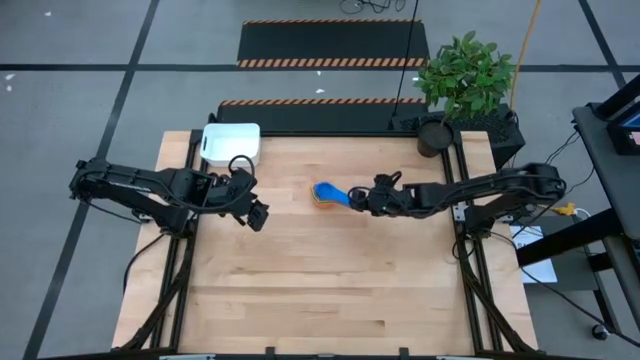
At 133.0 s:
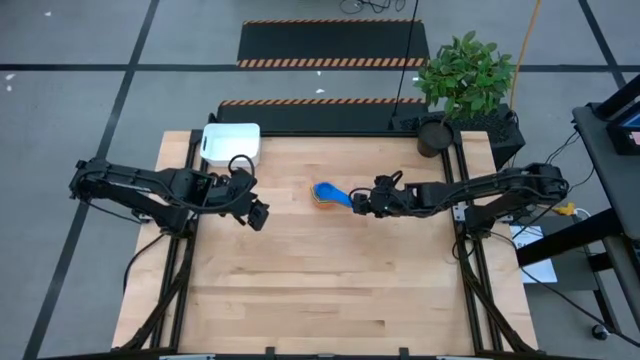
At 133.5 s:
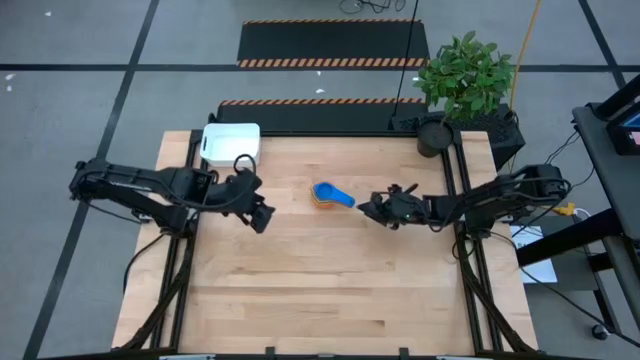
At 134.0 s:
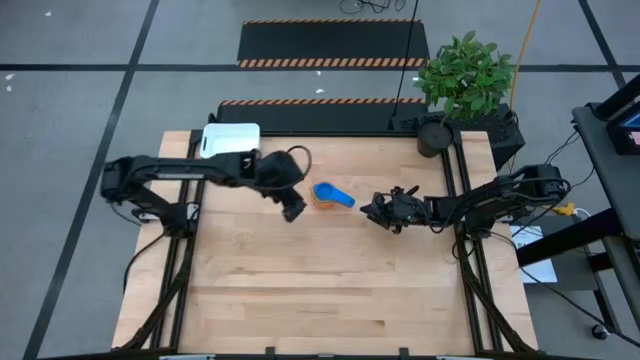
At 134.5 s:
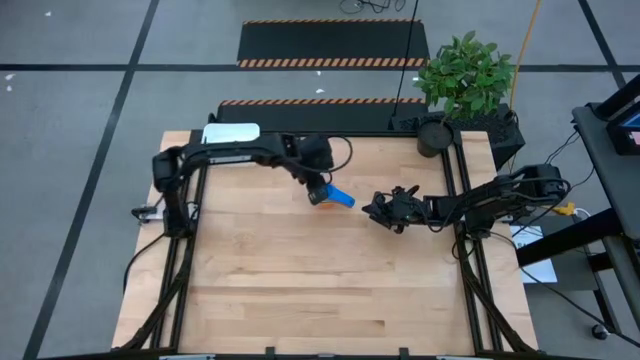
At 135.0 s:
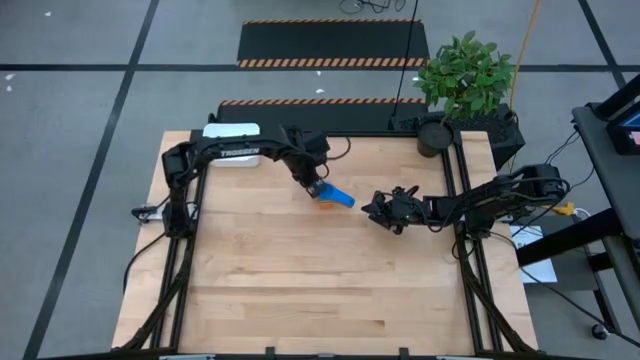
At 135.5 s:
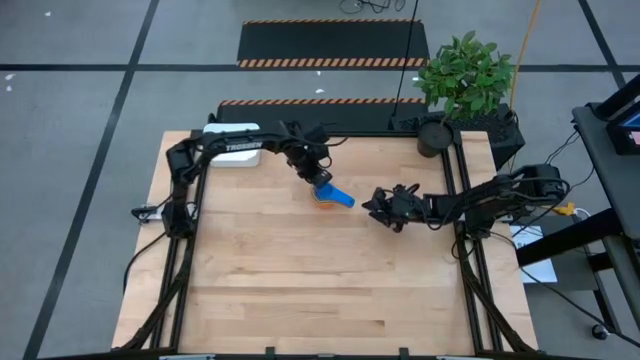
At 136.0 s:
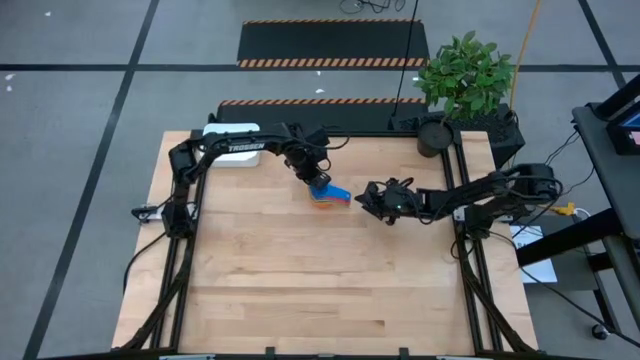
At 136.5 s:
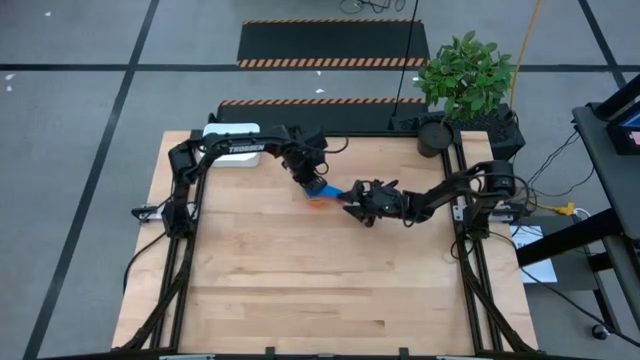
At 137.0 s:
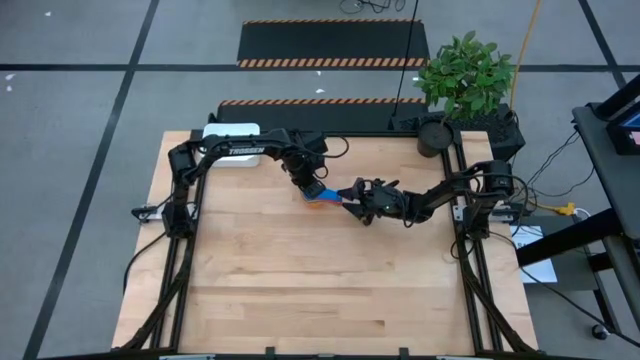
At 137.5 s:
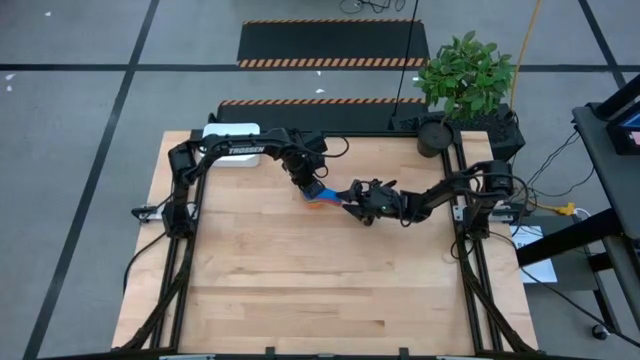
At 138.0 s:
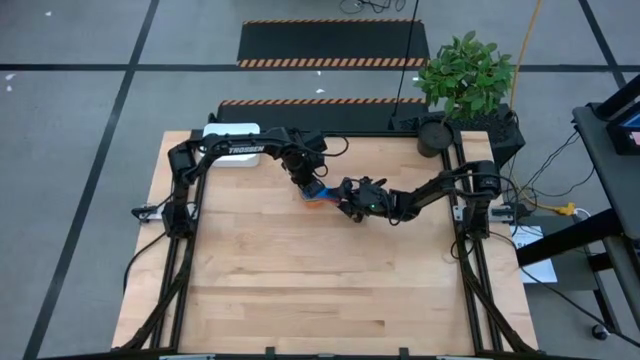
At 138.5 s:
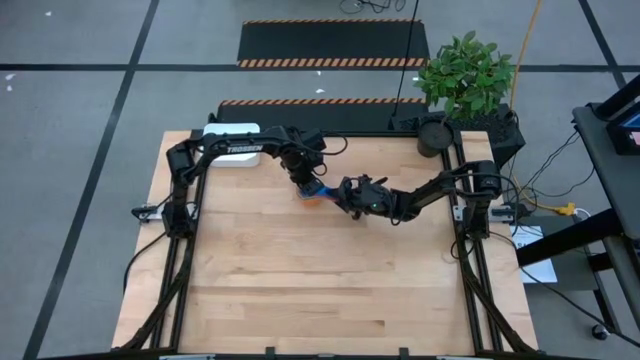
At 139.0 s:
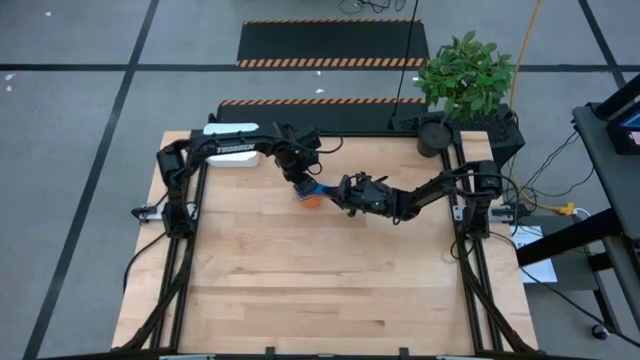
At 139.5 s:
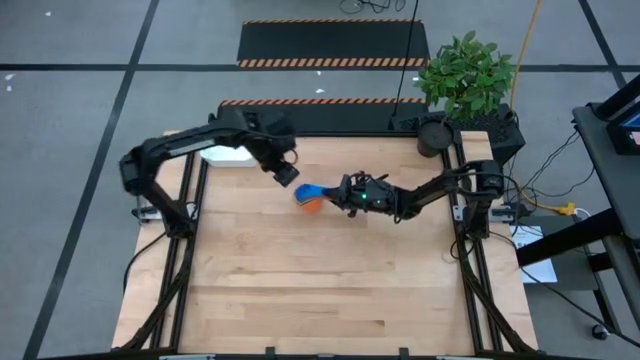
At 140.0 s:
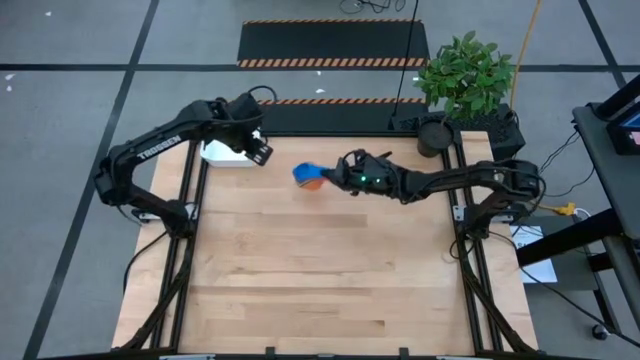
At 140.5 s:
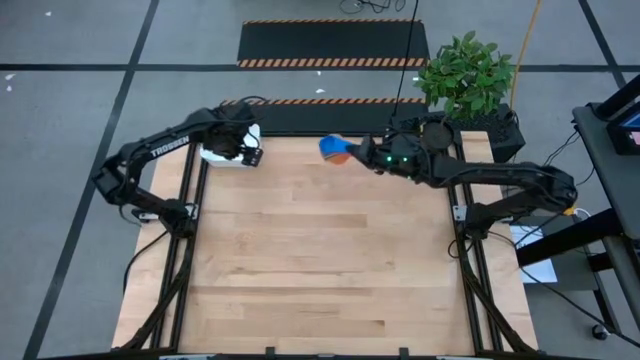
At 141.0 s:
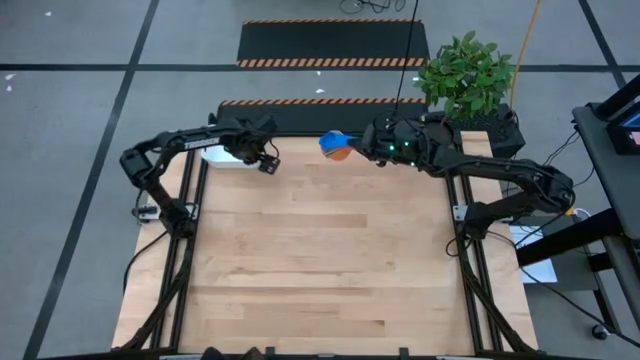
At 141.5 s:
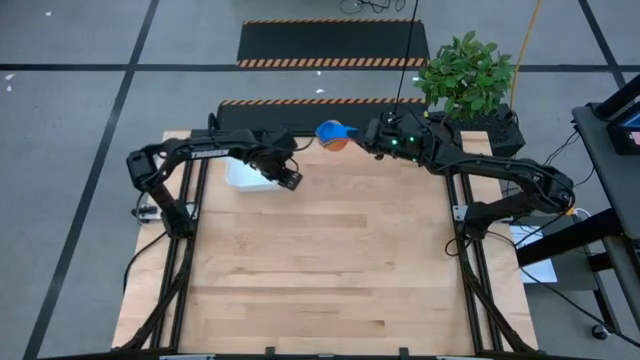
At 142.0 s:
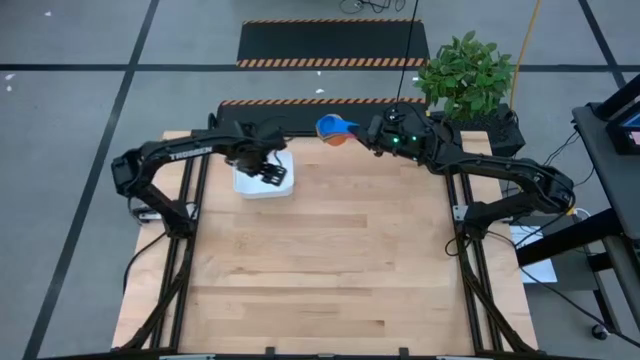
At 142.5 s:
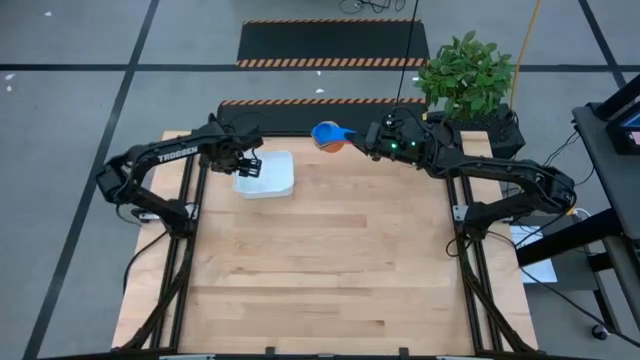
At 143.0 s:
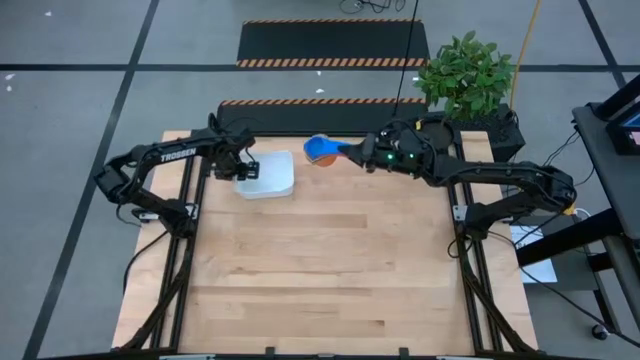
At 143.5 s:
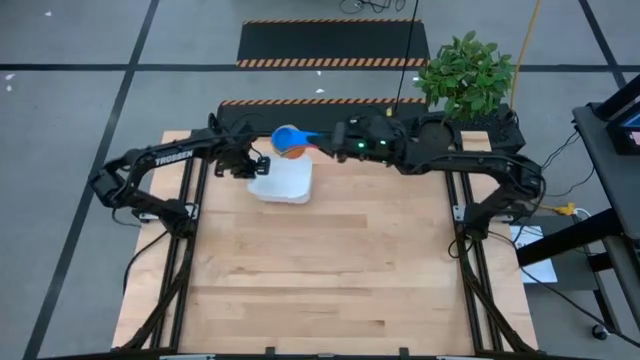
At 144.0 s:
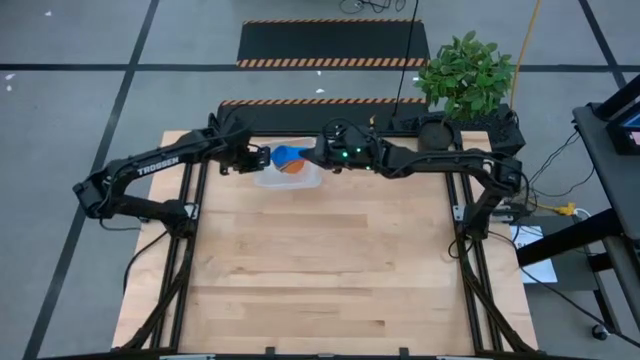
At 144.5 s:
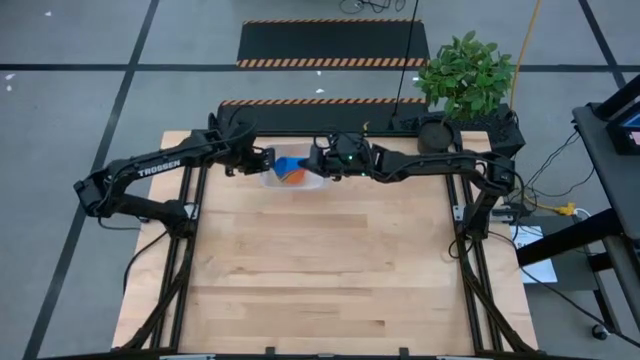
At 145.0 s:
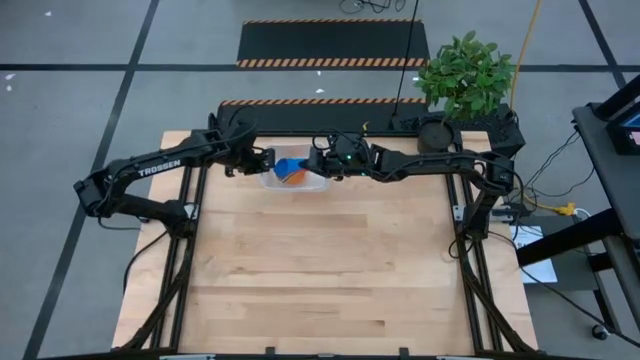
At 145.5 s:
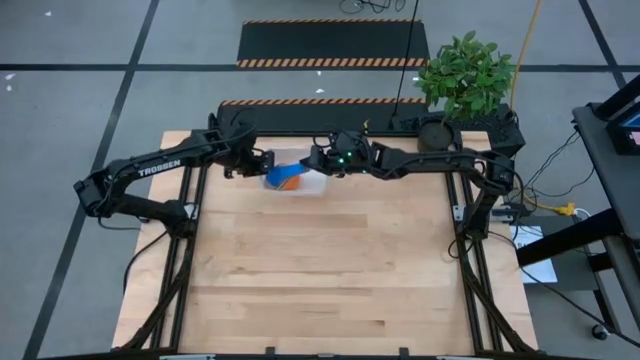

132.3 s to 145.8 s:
Task: Nest measuring cups in basket
Put the nested measuring cups into the white bin

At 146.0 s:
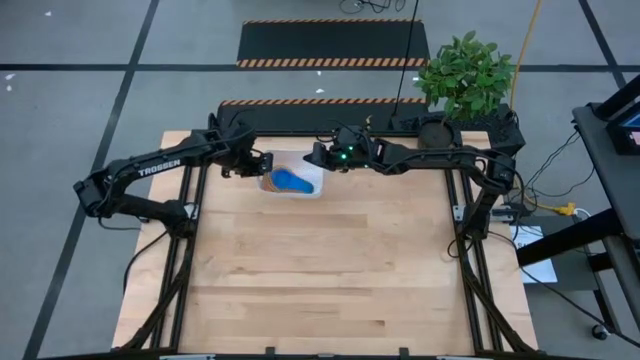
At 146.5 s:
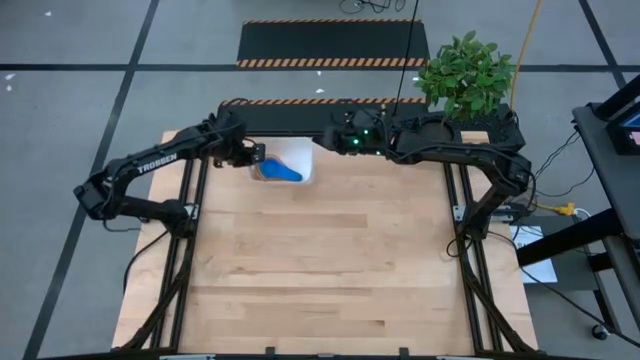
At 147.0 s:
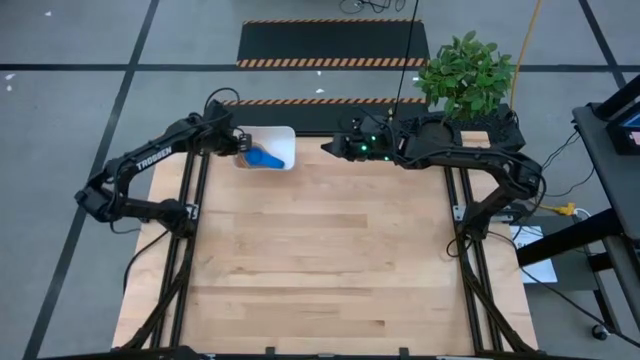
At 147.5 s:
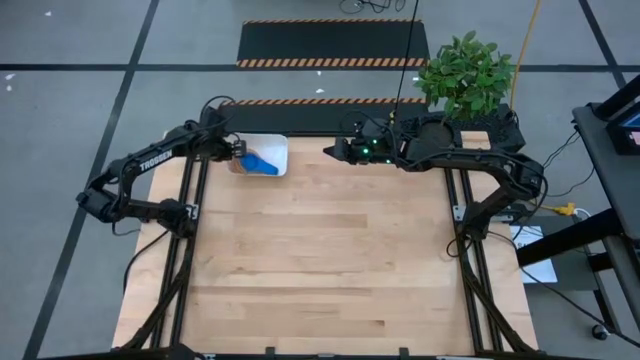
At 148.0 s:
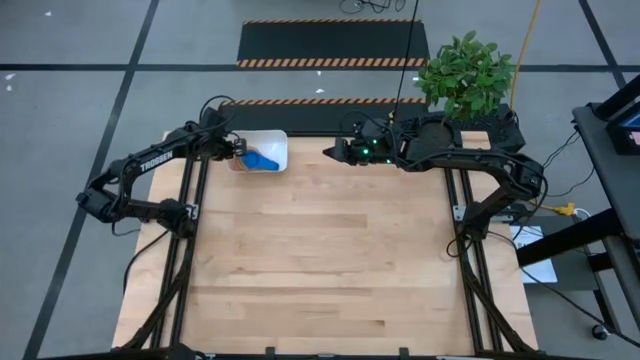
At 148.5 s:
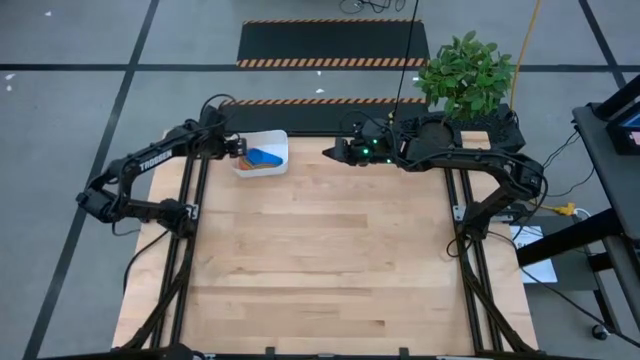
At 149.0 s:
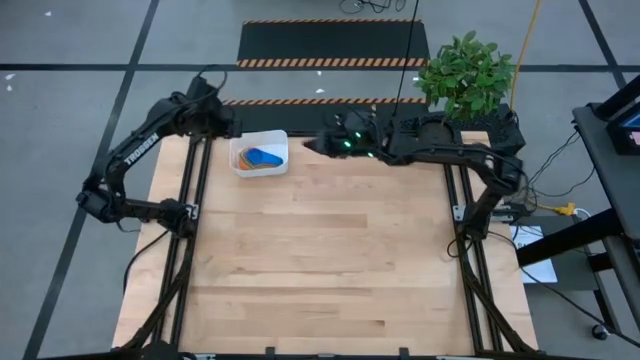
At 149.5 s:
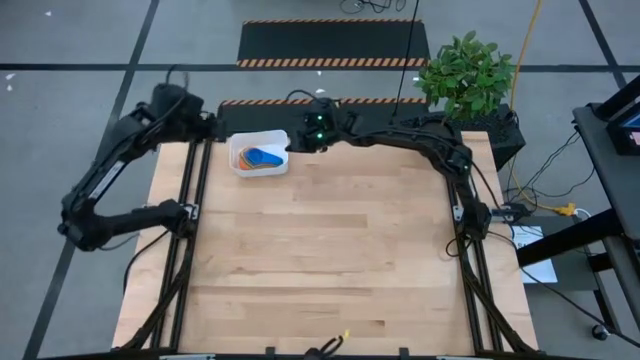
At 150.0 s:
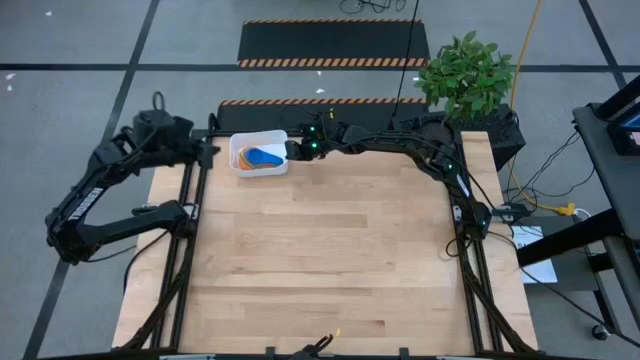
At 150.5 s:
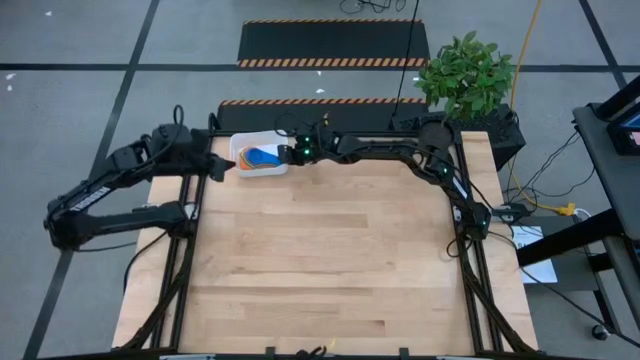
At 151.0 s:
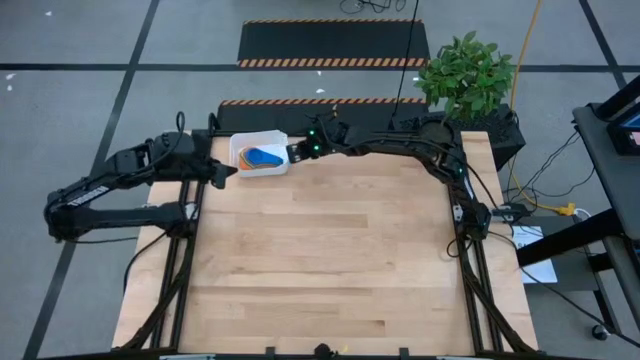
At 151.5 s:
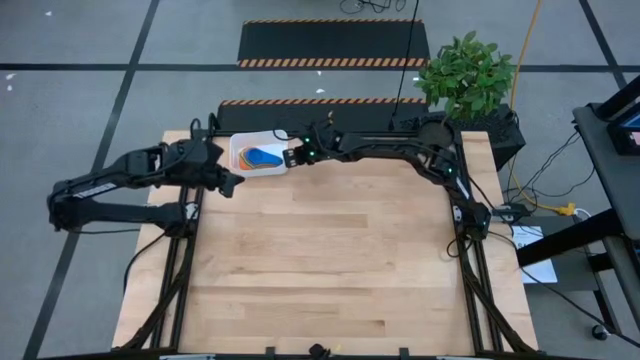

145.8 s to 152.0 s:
Adjust the bin

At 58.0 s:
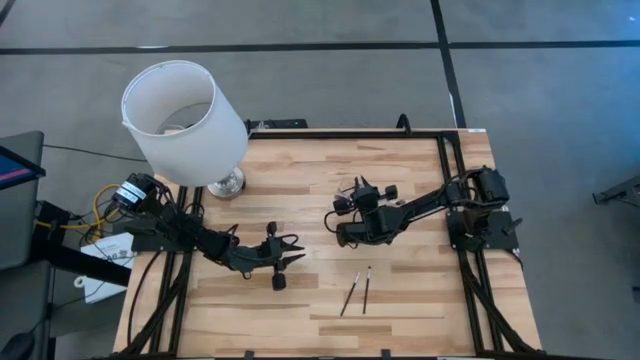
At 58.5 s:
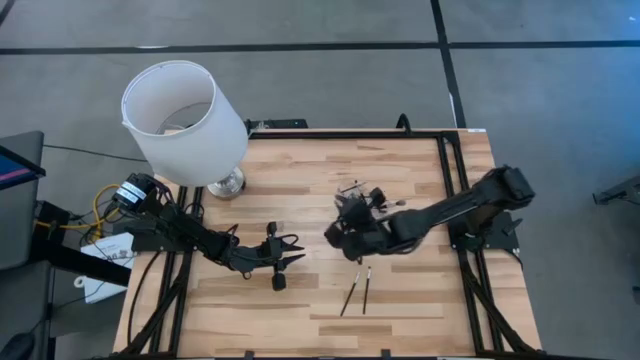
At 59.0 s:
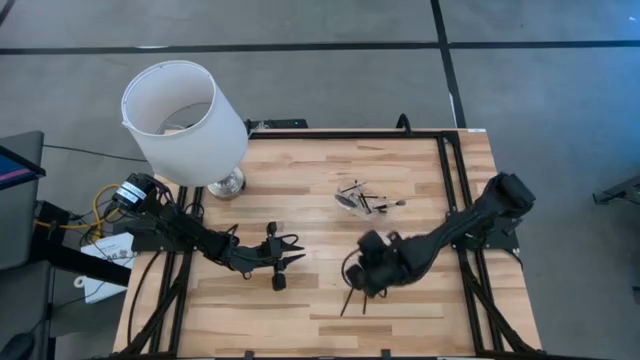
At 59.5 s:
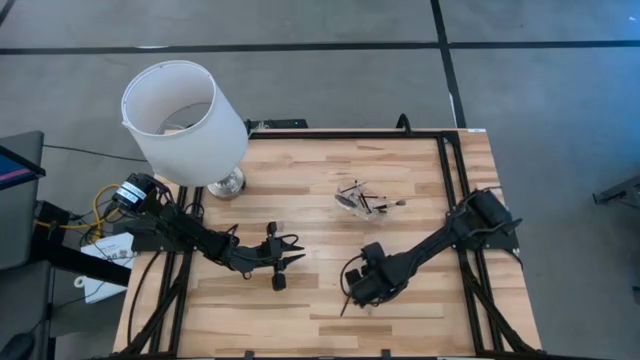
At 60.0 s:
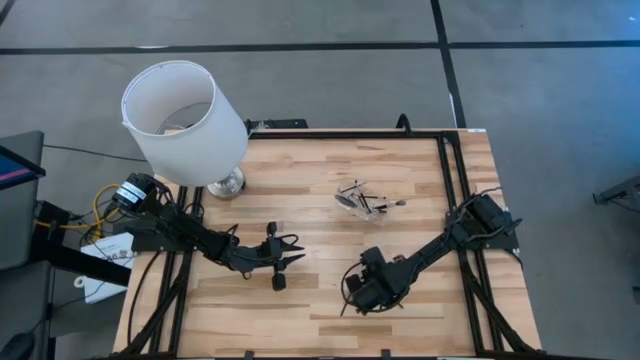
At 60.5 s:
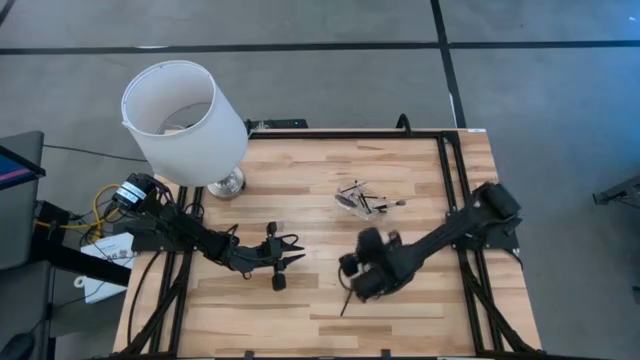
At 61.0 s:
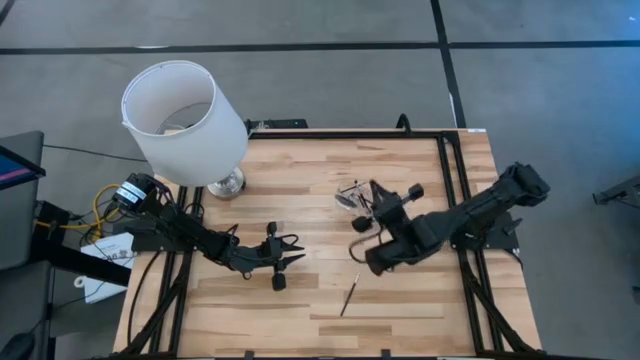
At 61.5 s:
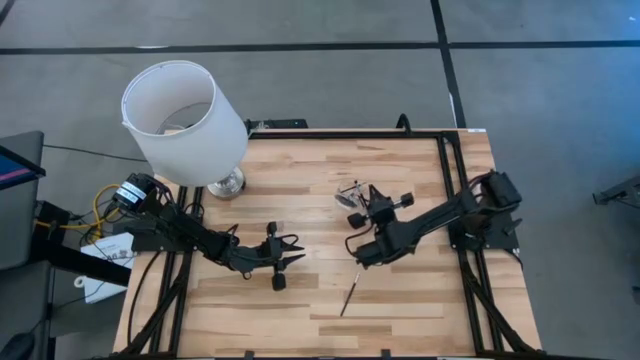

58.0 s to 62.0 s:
Task: Put items in baskets/containers
Put the black eyeshadow brush into the transparent organizer
